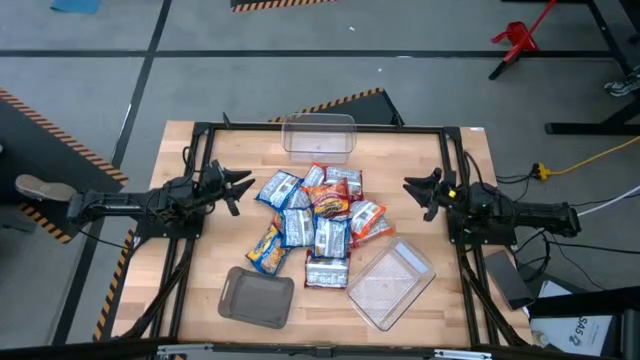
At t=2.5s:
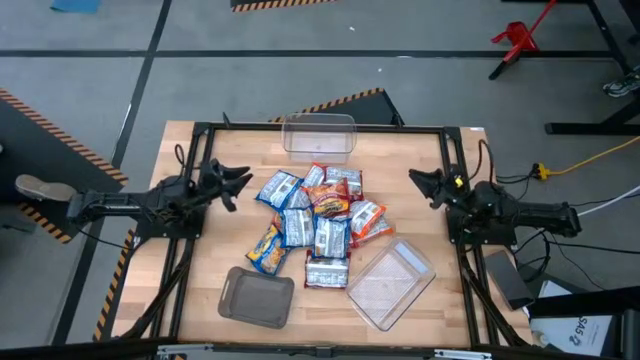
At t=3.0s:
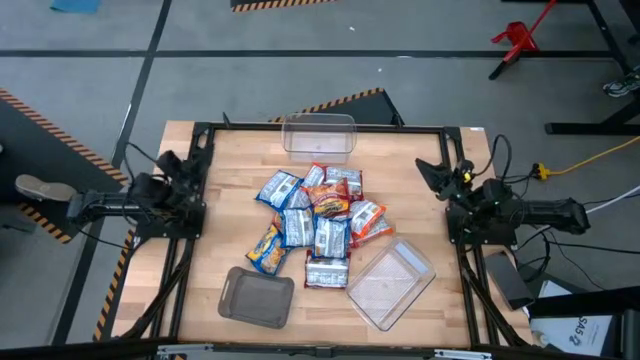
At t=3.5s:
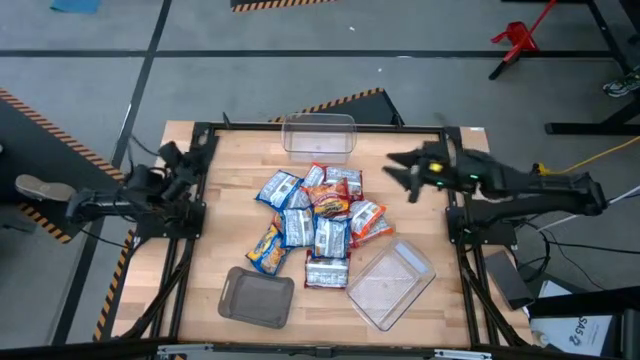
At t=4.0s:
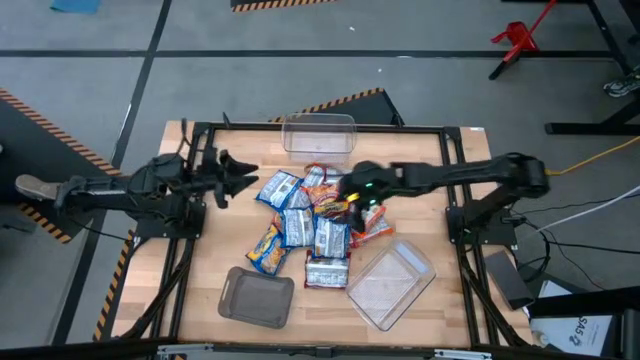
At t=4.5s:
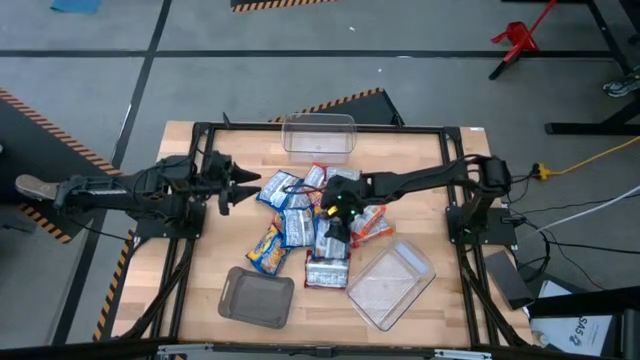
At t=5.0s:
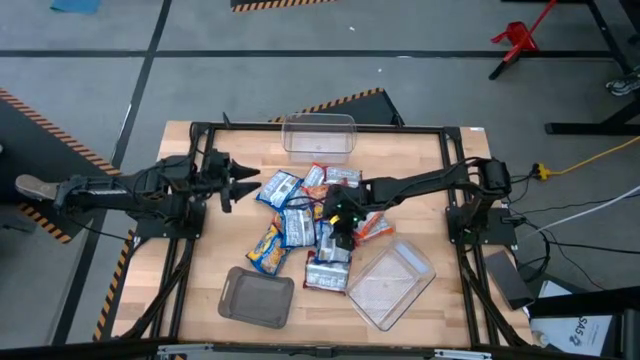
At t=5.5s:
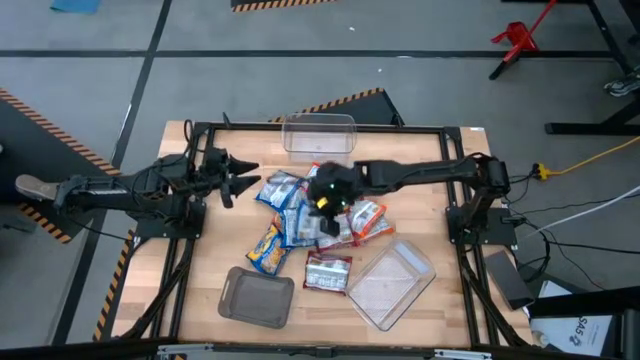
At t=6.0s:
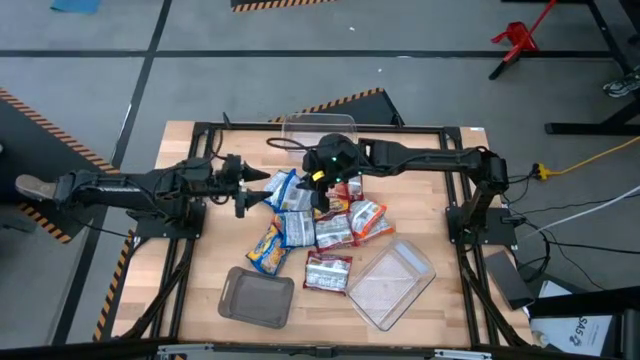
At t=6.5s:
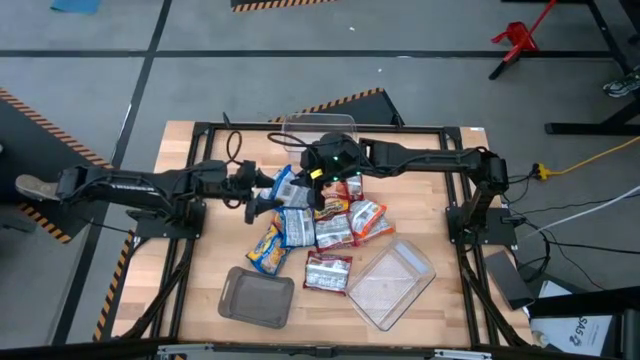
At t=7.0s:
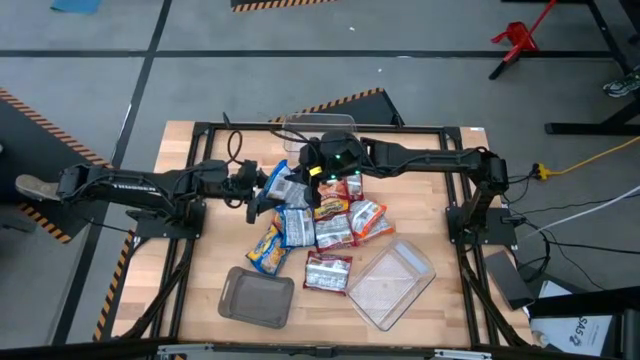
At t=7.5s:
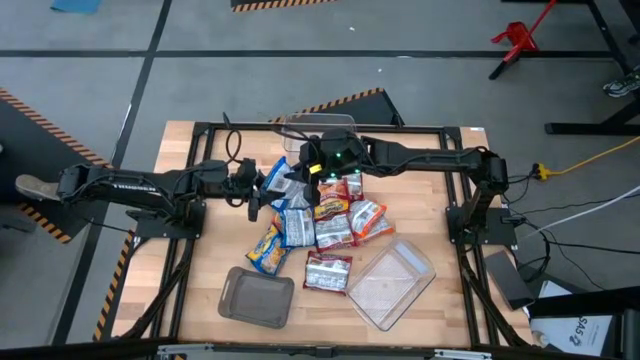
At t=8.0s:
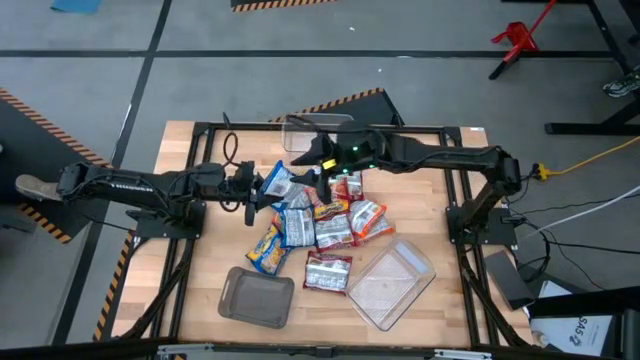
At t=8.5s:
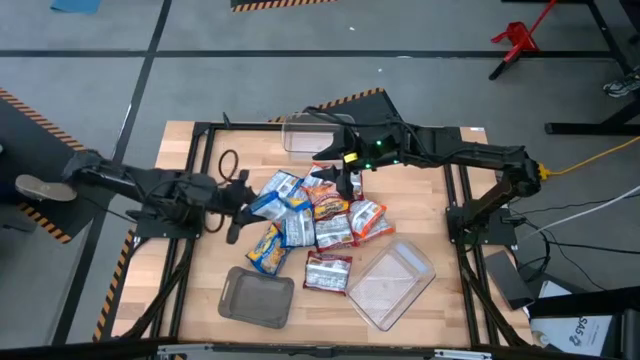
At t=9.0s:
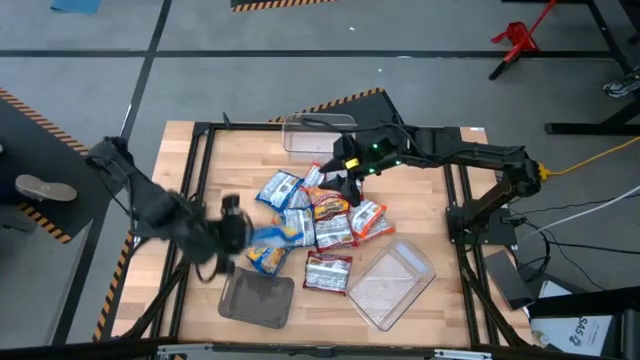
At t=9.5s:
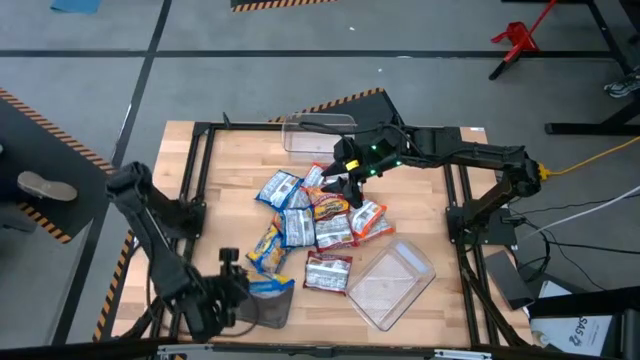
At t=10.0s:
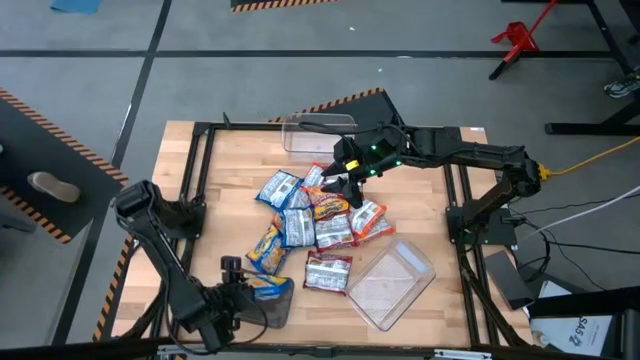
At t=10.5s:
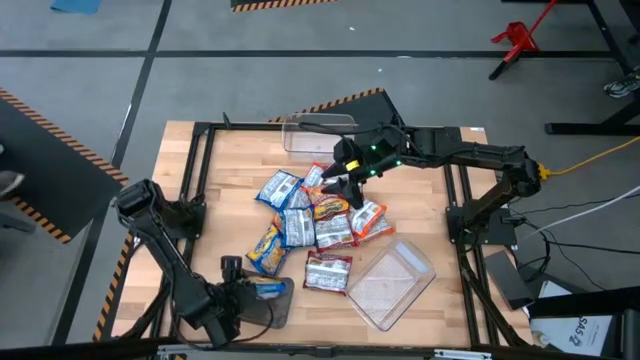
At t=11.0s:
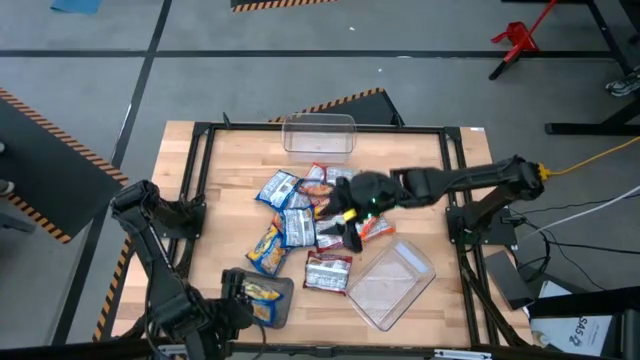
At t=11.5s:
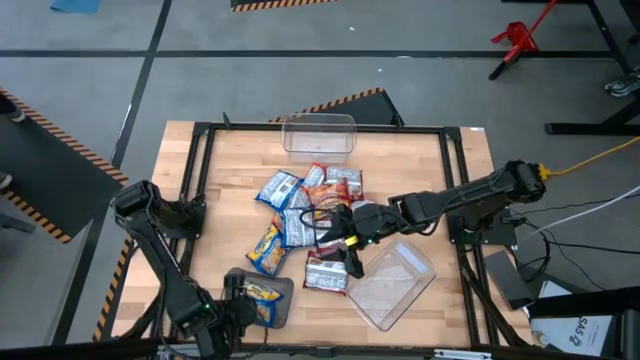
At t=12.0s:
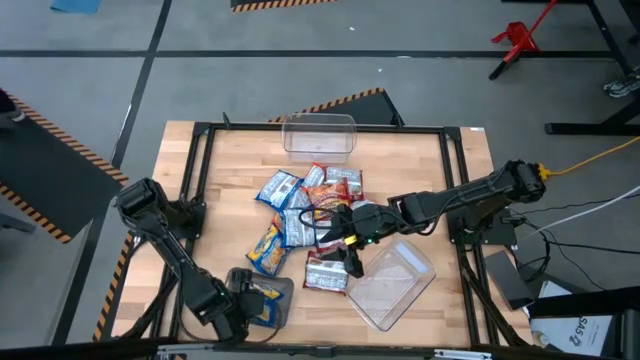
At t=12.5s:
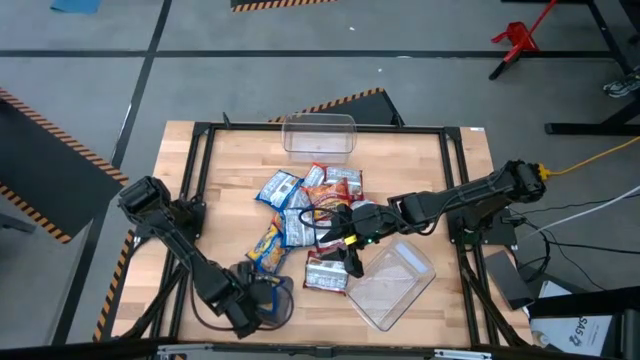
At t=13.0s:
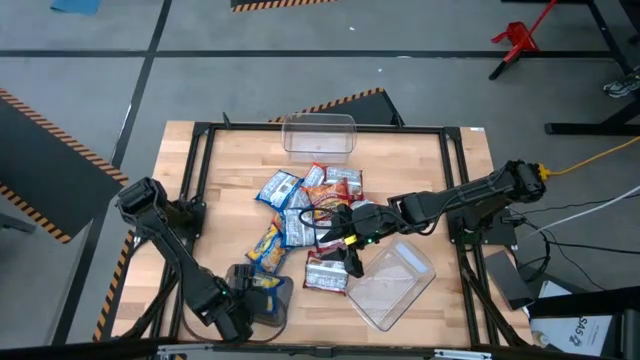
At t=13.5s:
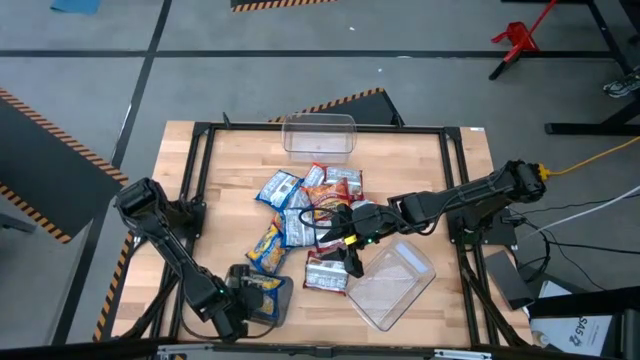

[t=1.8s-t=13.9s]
Task: Sort Maruchan noodles
Put the blue noodle pack into the black bin

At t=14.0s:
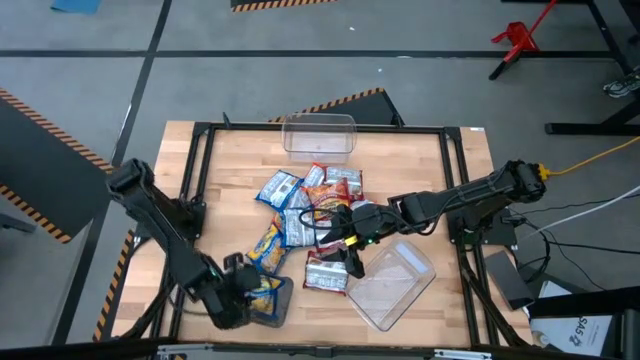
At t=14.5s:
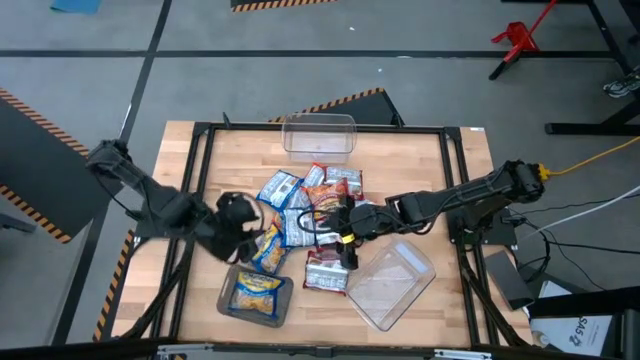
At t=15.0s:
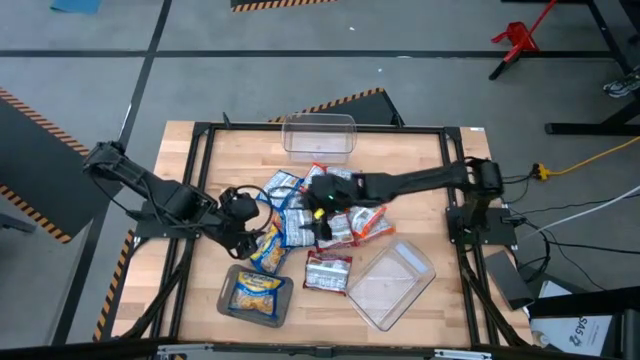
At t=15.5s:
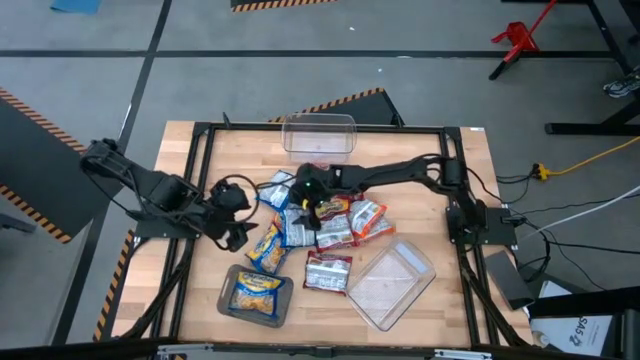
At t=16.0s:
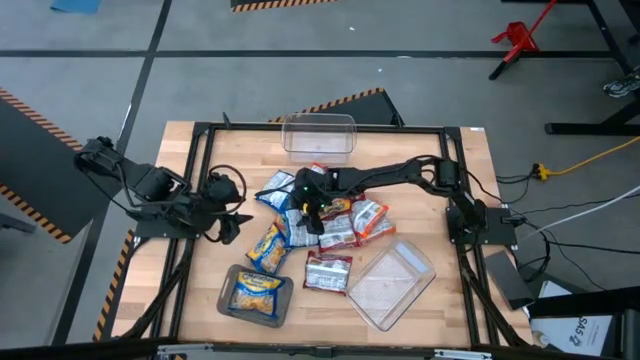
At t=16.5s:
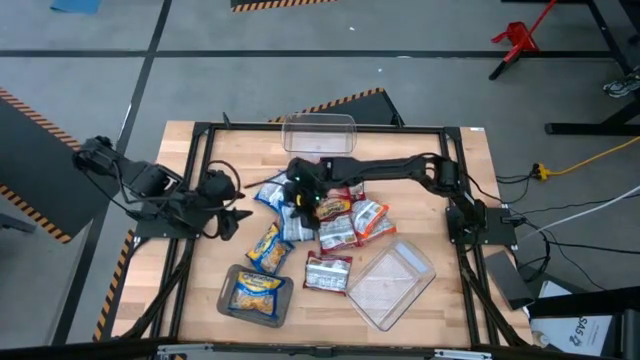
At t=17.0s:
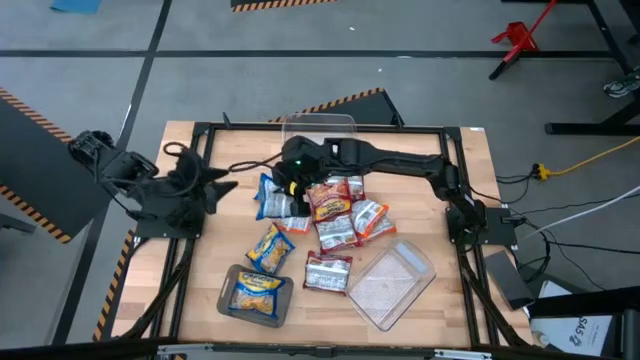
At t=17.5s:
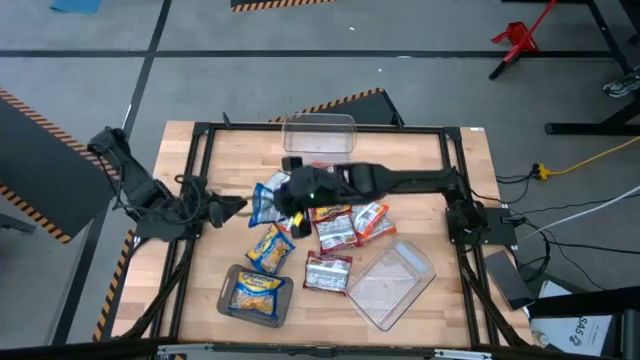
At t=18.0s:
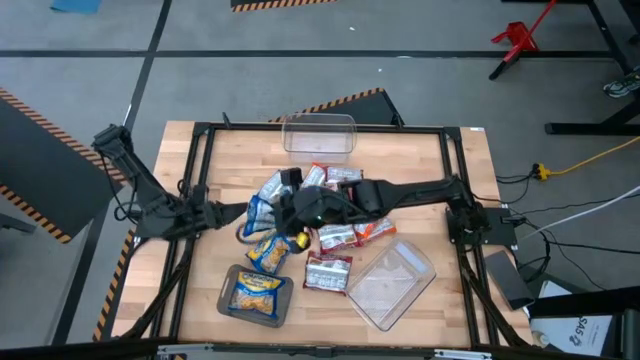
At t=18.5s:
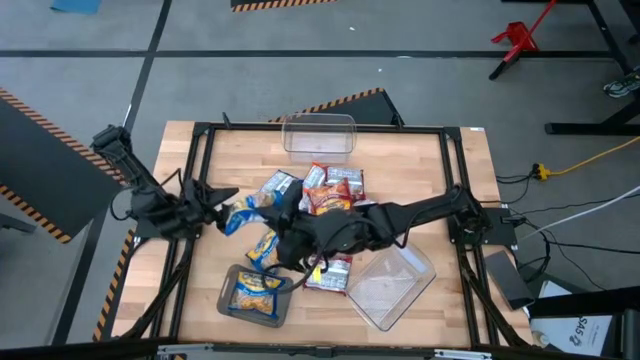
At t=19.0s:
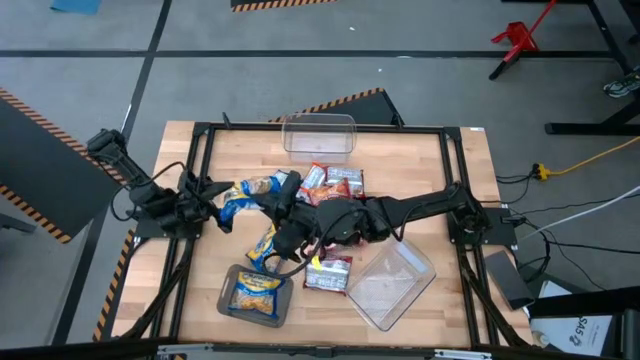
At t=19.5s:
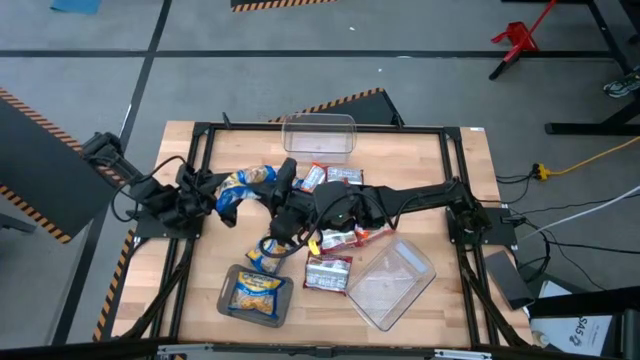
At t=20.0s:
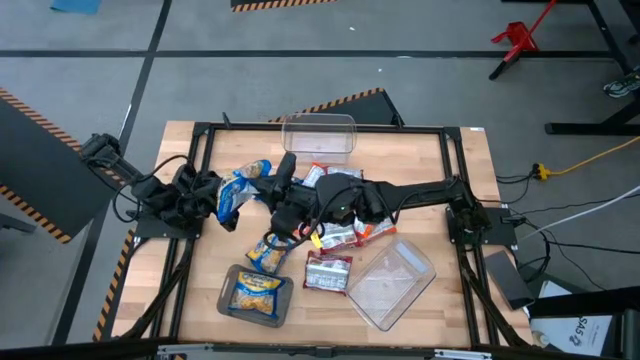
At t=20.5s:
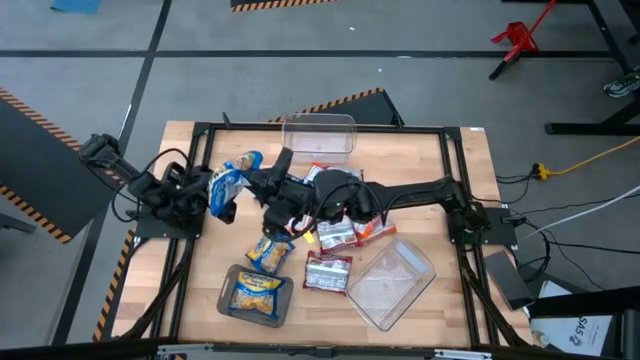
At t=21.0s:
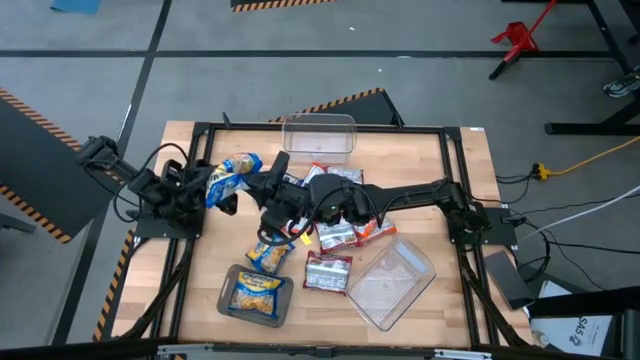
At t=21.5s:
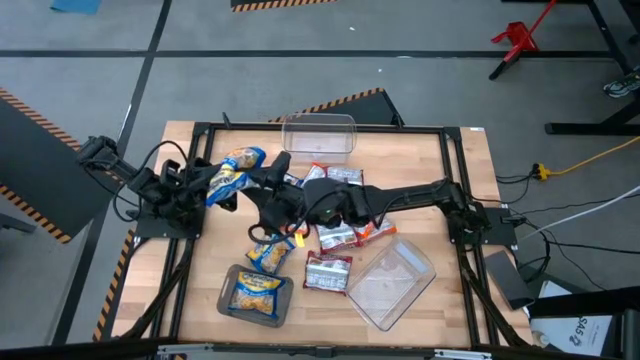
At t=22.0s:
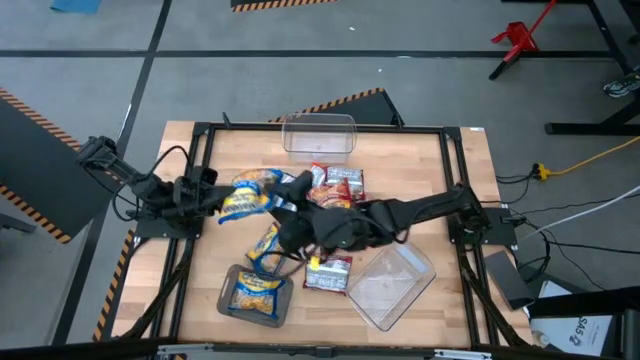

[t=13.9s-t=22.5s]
Put the blue noodle pack into the black bin

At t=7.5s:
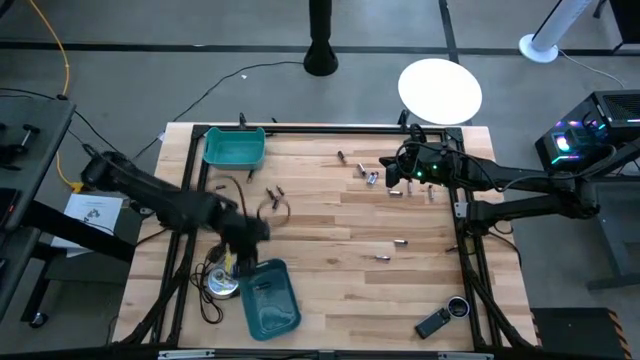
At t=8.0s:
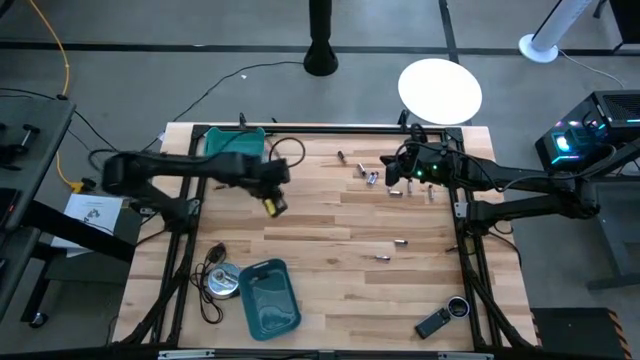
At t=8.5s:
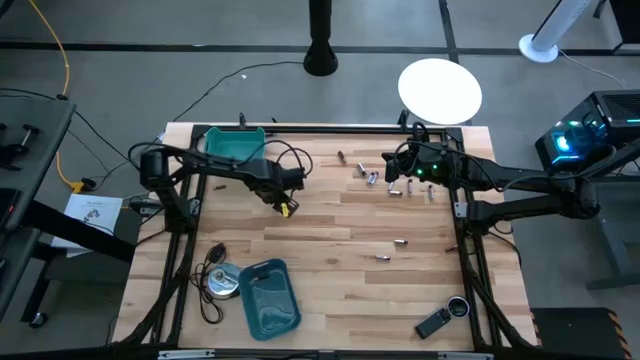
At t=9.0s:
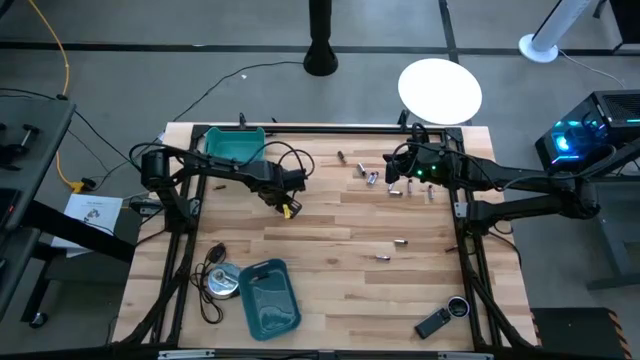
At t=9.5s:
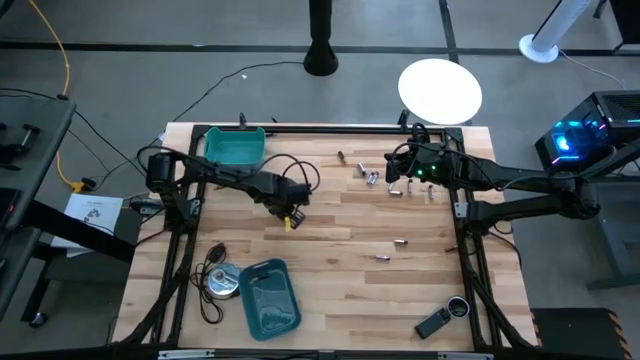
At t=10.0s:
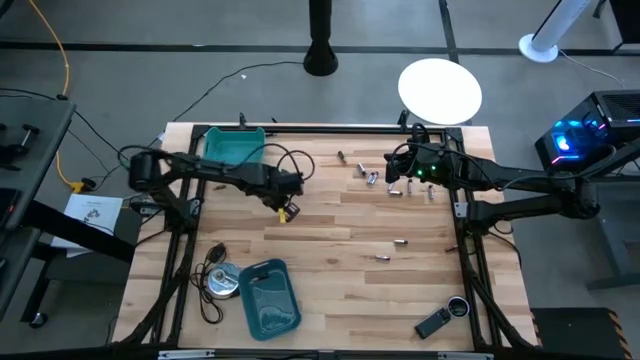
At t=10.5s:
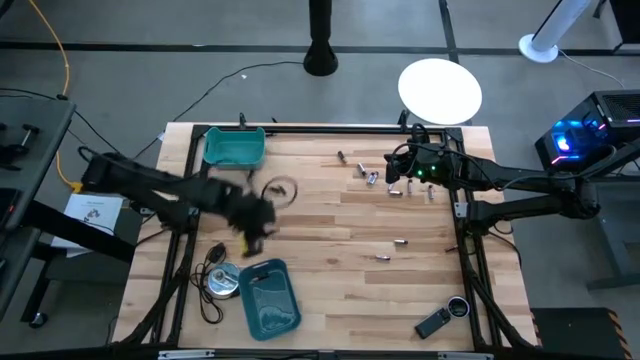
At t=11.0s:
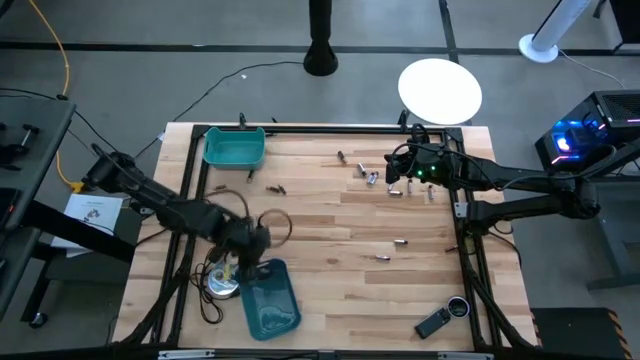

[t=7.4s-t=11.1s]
Task: Sort batteries
Put the black battery into the blue bin
